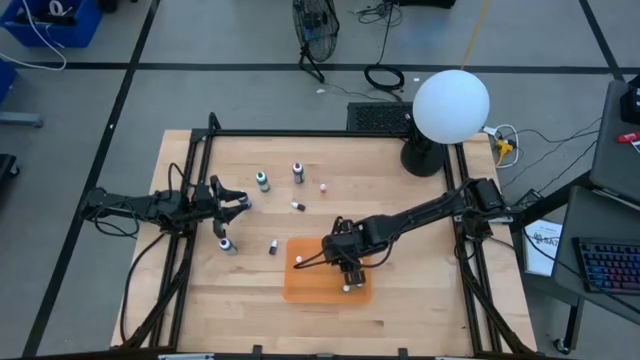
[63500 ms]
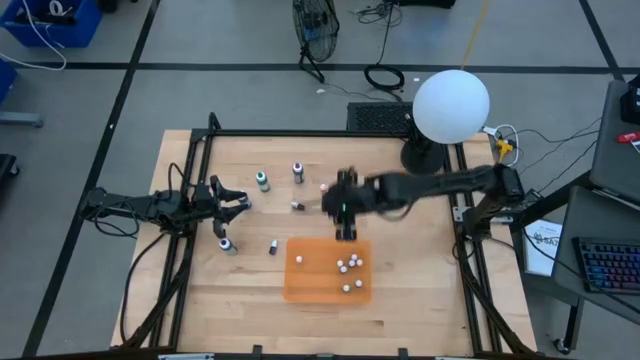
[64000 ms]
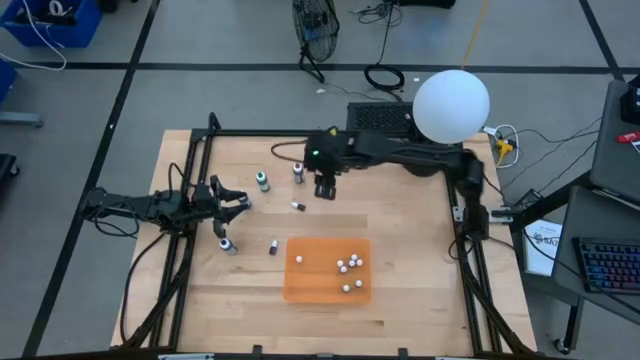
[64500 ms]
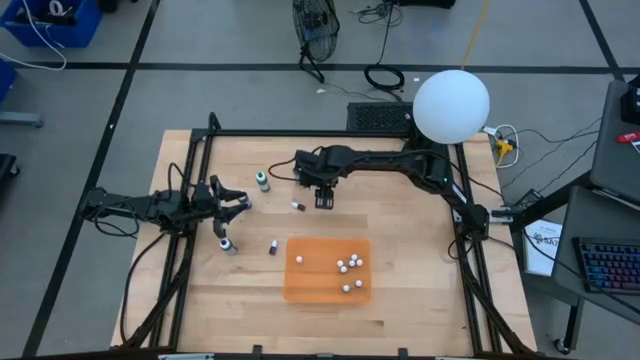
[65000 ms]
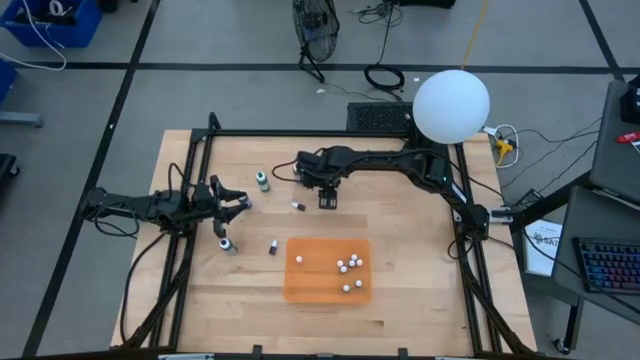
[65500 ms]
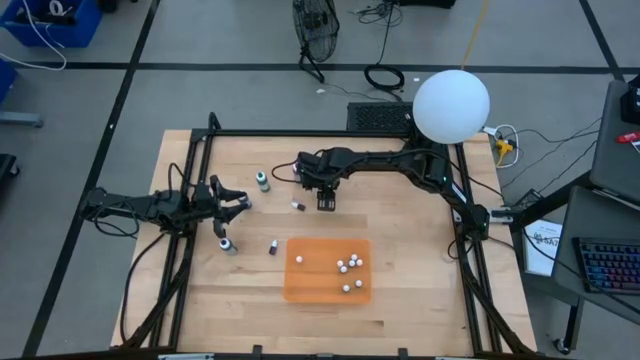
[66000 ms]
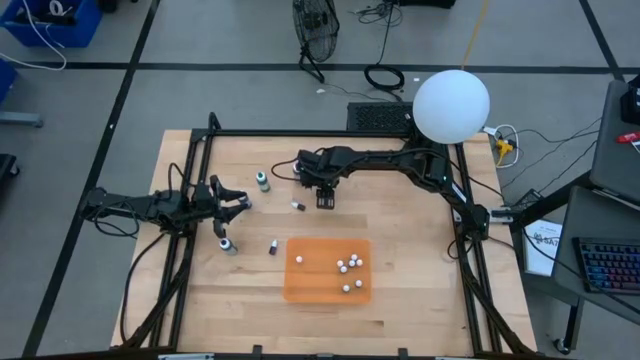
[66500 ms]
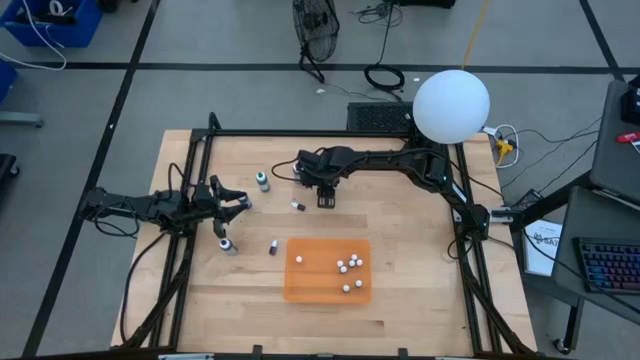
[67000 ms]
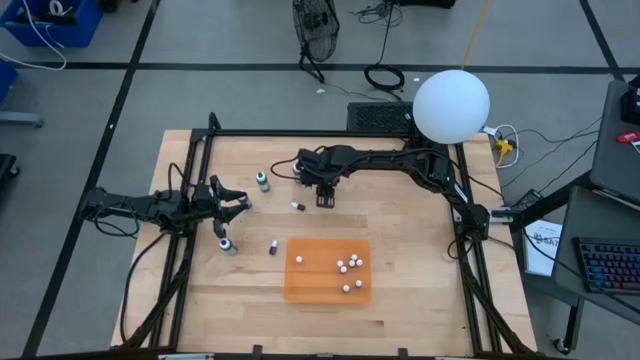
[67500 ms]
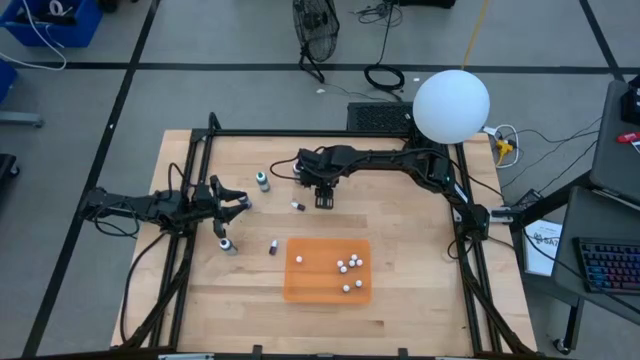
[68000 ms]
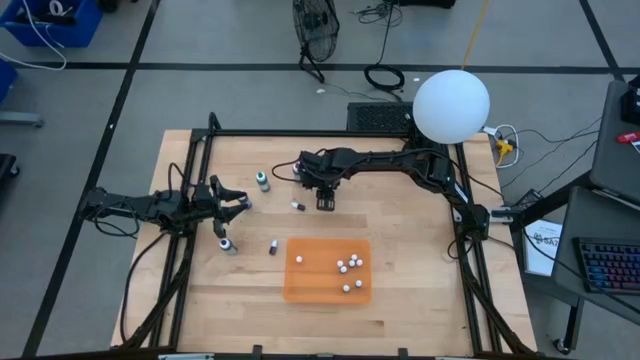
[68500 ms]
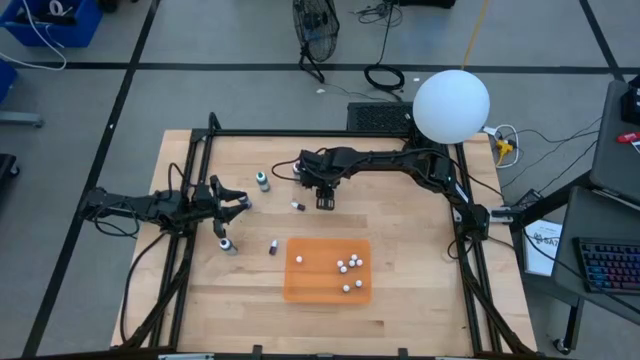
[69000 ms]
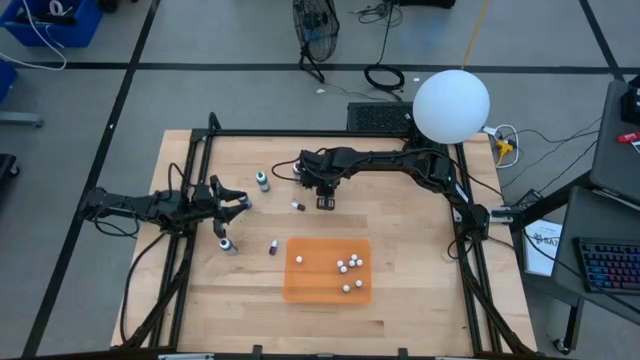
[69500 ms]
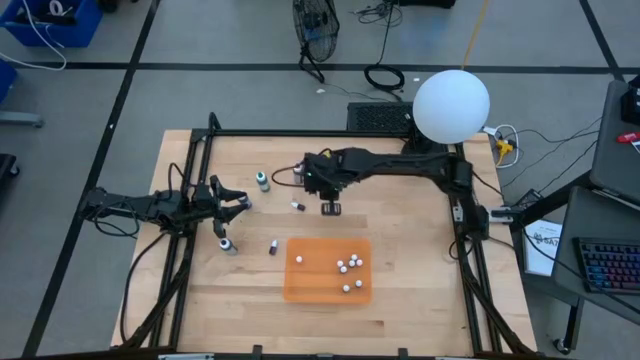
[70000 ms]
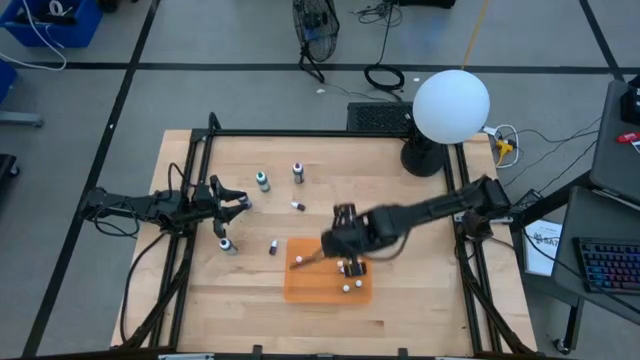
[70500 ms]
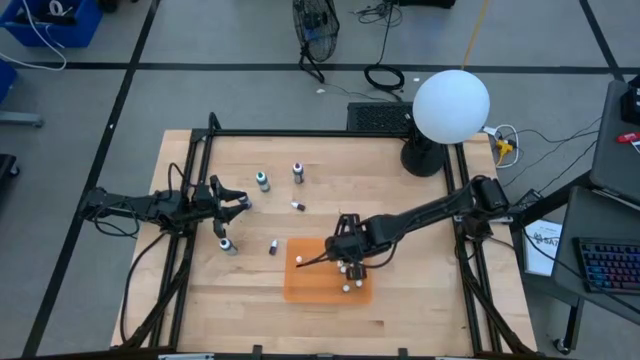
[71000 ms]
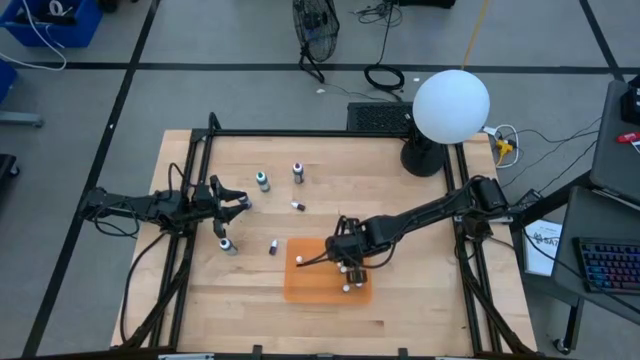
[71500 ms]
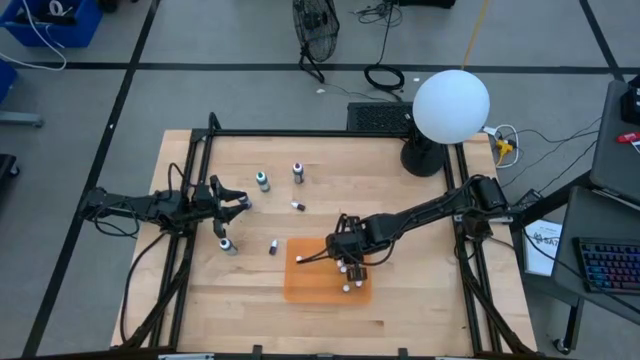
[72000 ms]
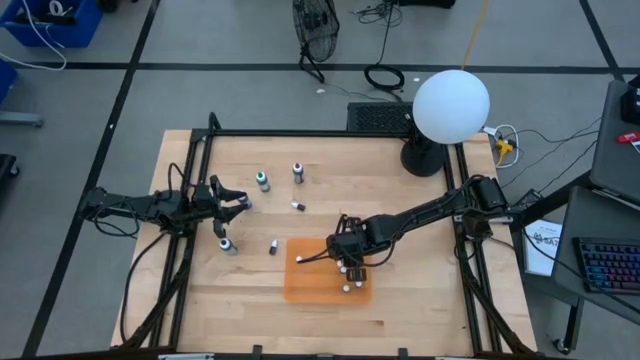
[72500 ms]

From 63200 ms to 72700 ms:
Task: Pick & Place food coloring
Put the small orange food coloring bottle into the orange bin

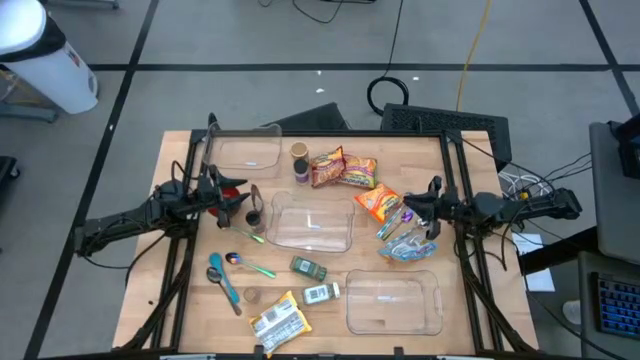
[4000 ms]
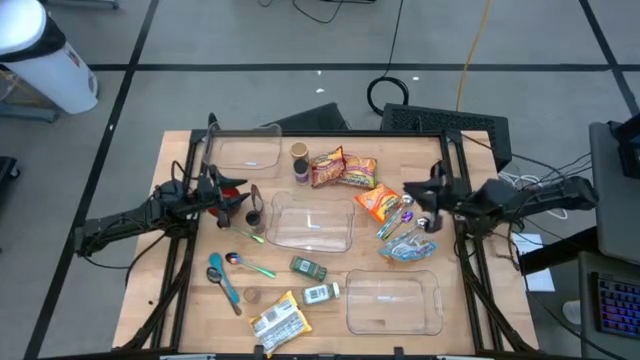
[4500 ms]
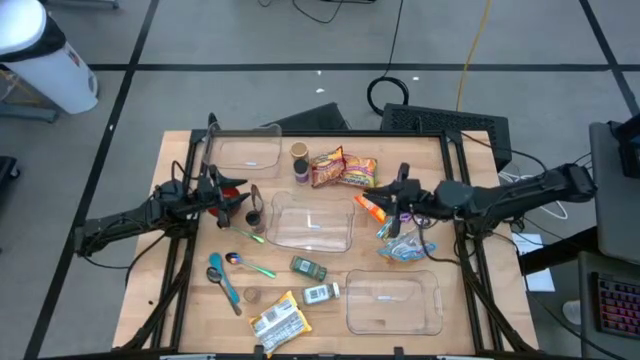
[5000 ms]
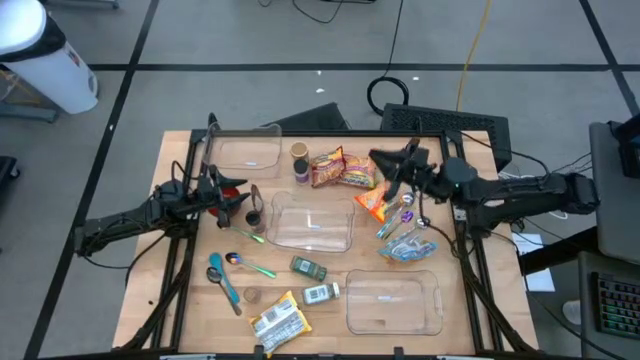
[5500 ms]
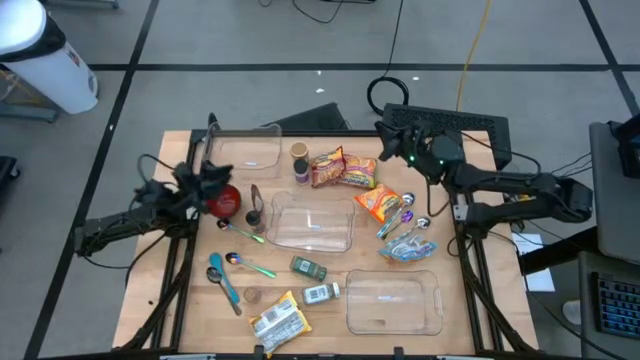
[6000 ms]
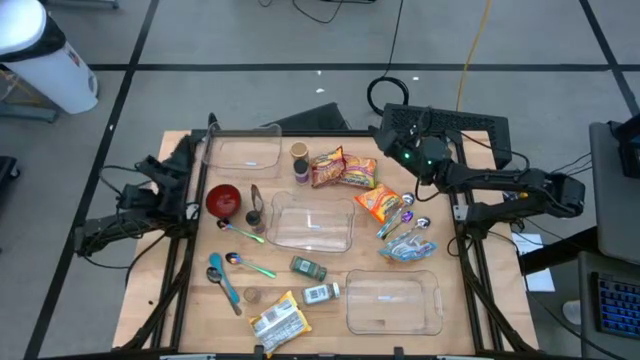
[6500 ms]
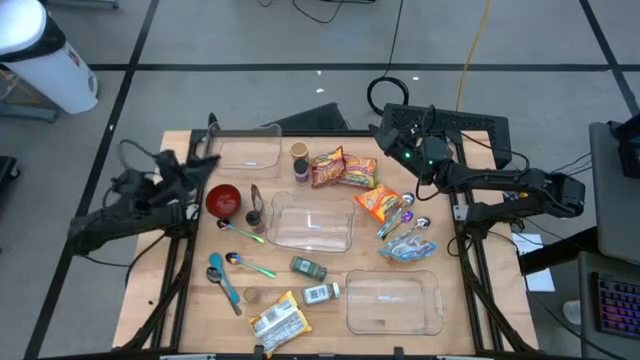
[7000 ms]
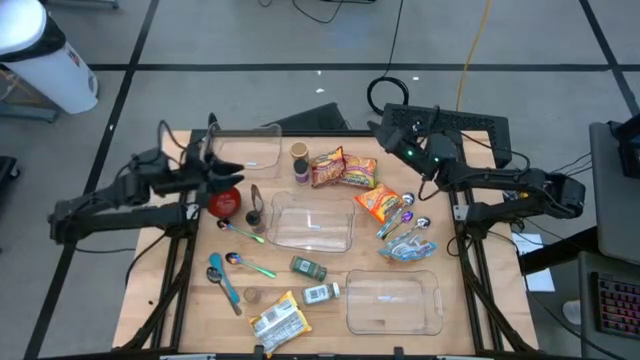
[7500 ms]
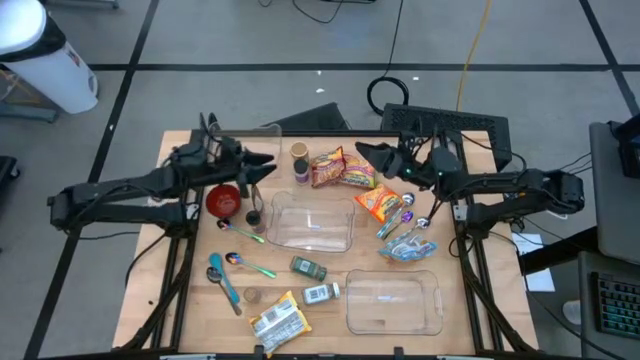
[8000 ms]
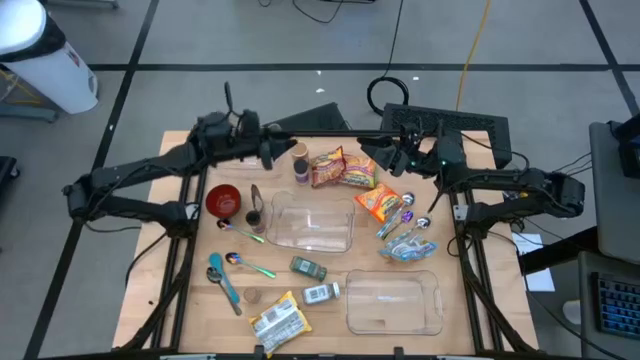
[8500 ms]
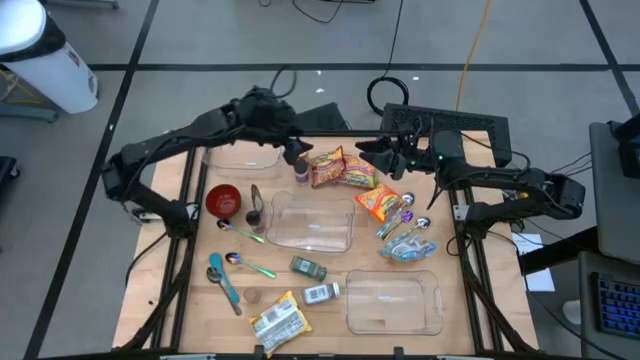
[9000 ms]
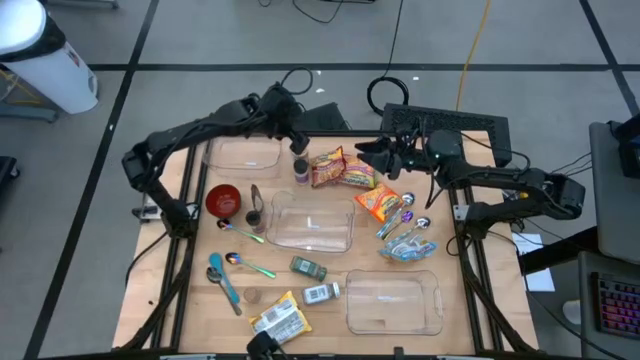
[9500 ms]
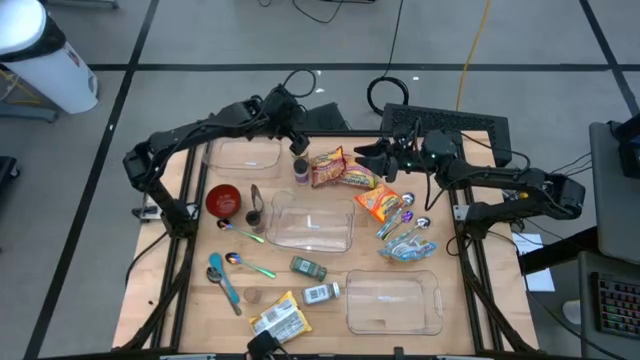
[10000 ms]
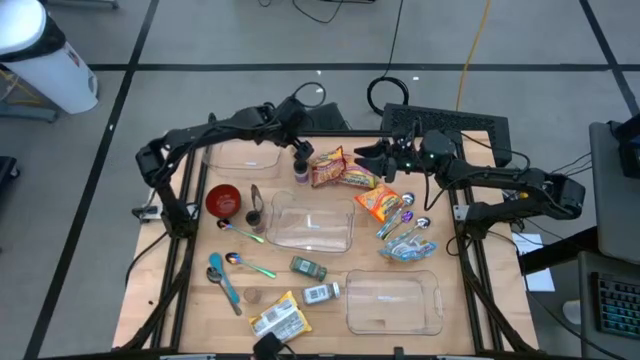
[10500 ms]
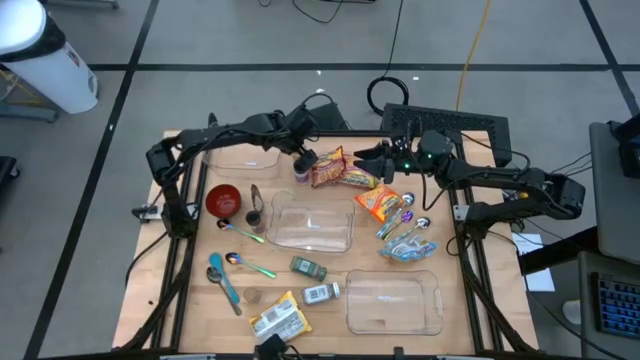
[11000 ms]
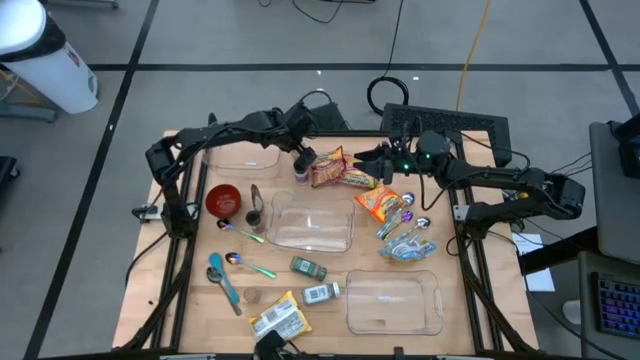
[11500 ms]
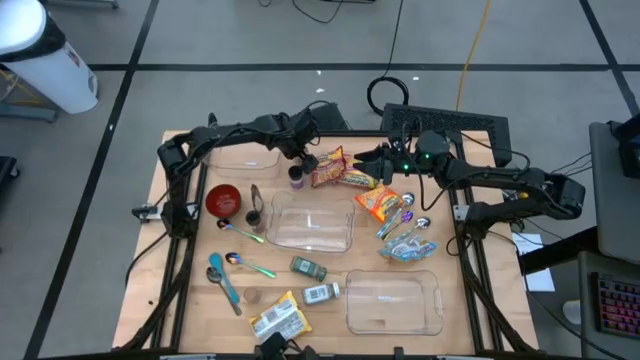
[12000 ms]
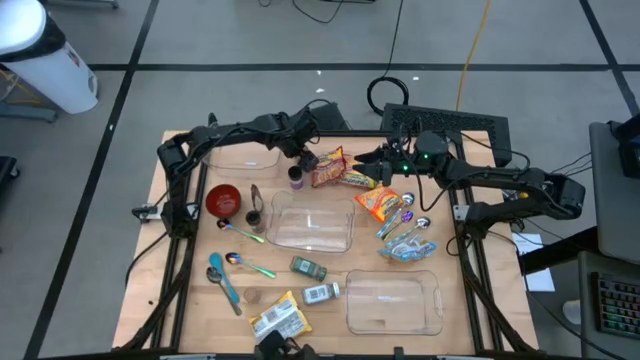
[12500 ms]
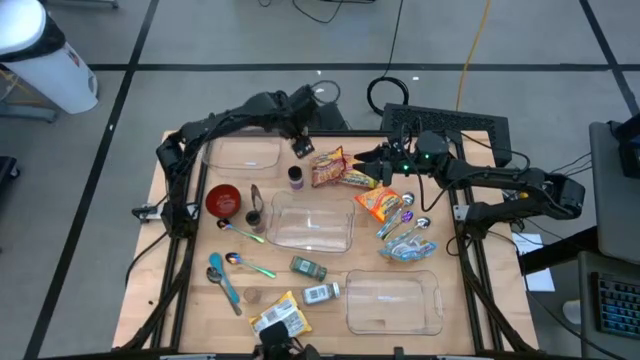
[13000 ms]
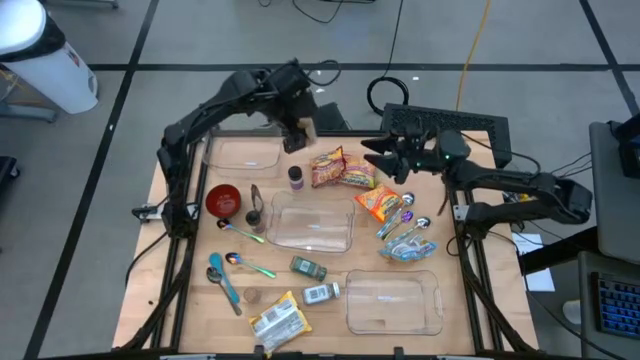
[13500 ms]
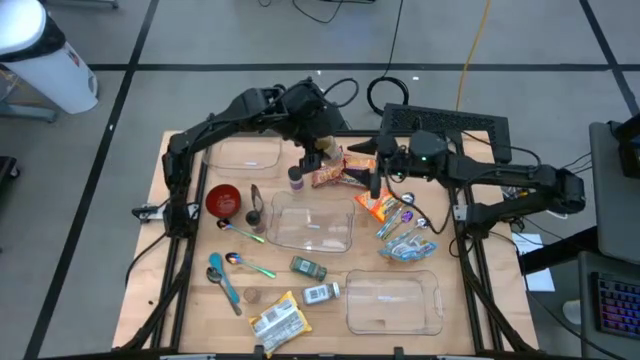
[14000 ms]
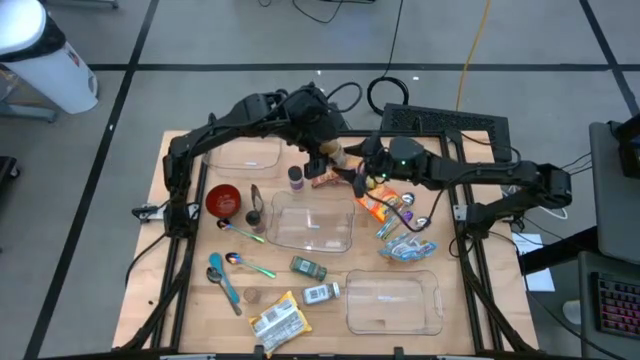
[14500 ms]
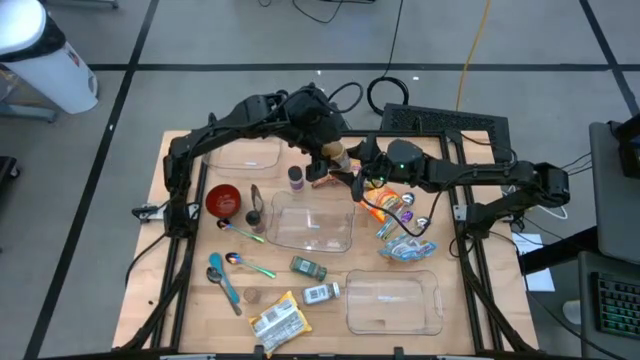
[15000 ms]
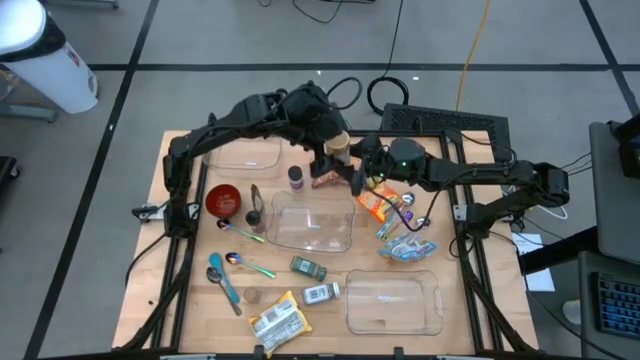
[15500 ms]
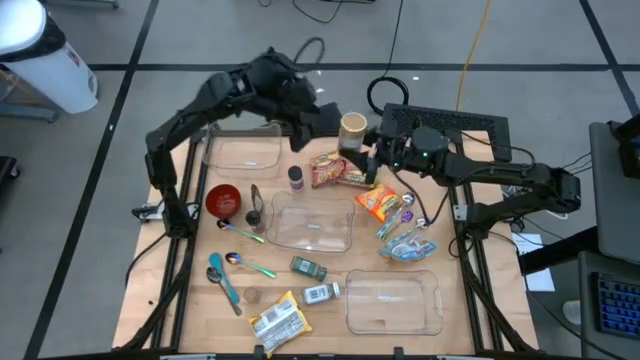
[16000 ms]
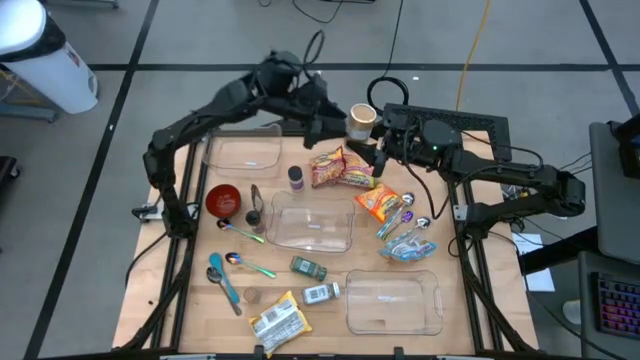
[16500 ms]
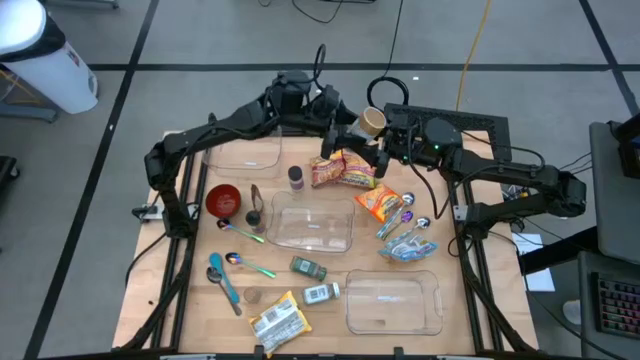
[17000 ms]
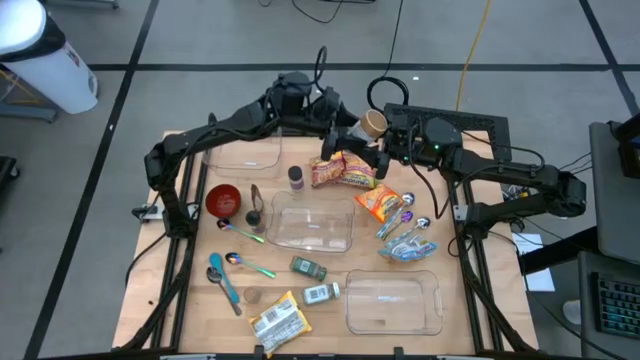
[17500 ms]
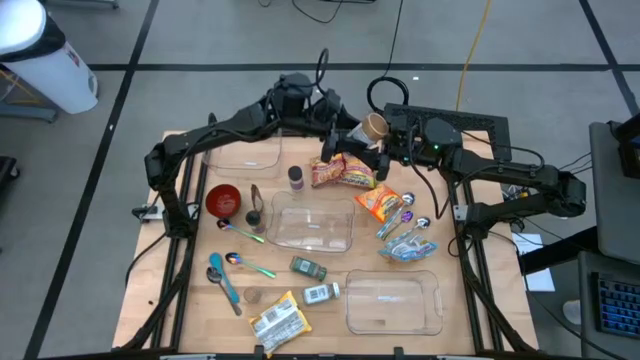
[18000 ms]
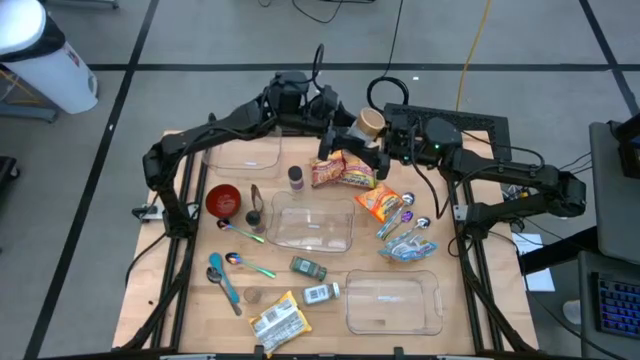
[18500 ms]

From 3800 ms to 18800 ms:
Task: Pick & Place Food Item
Put the gold seasoning bottle into the bottom transparent bin
